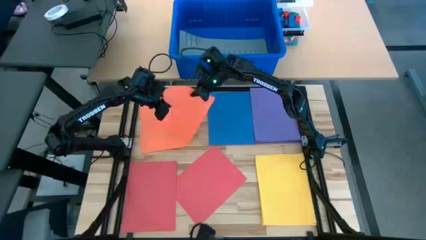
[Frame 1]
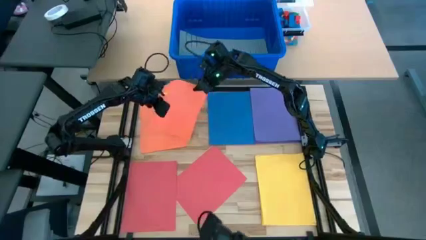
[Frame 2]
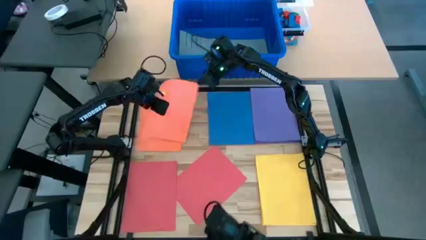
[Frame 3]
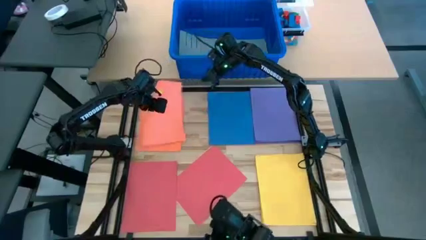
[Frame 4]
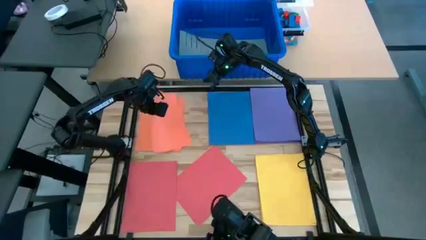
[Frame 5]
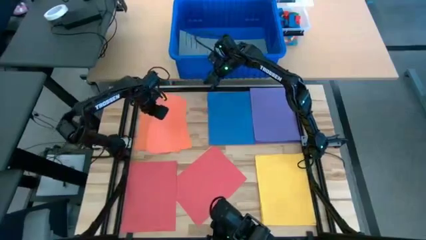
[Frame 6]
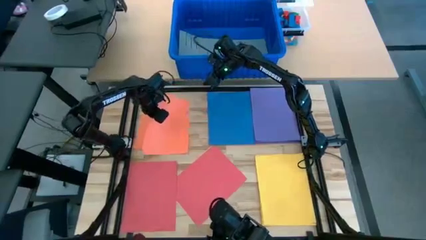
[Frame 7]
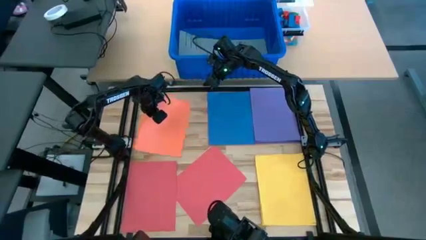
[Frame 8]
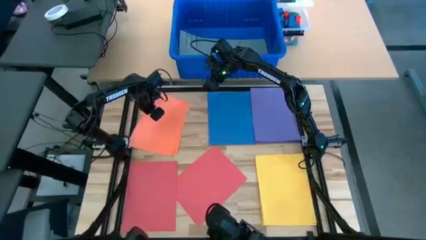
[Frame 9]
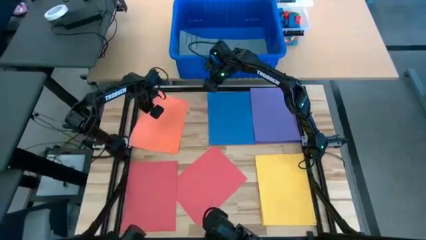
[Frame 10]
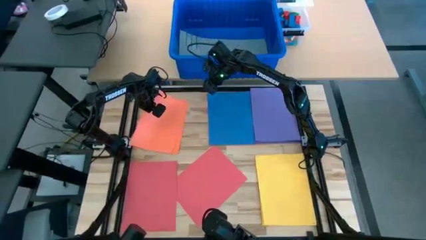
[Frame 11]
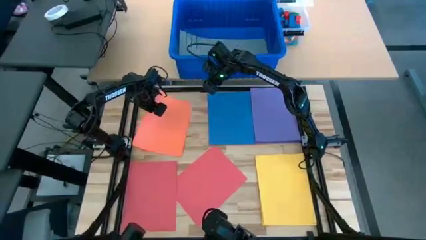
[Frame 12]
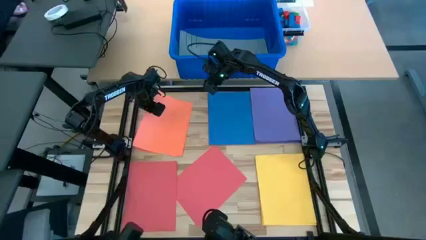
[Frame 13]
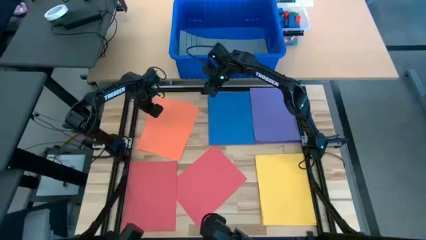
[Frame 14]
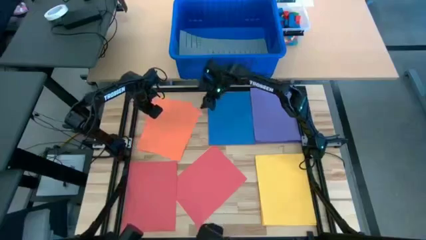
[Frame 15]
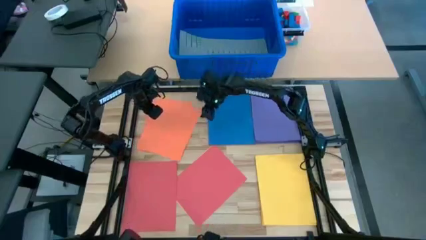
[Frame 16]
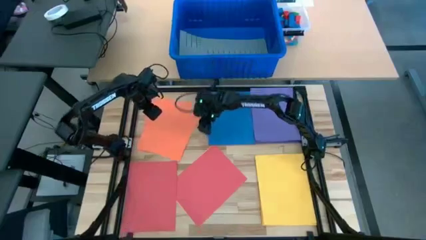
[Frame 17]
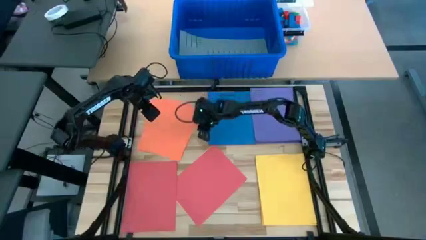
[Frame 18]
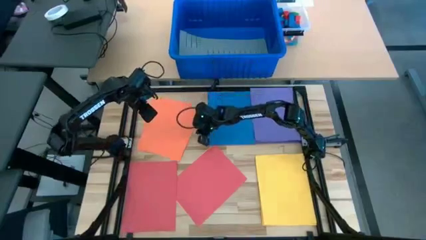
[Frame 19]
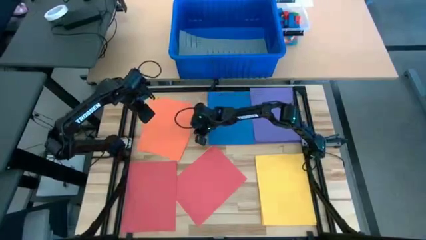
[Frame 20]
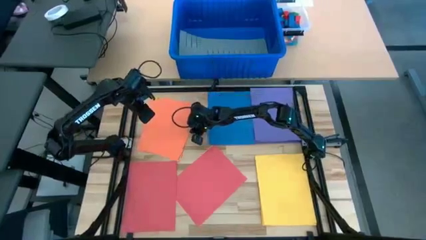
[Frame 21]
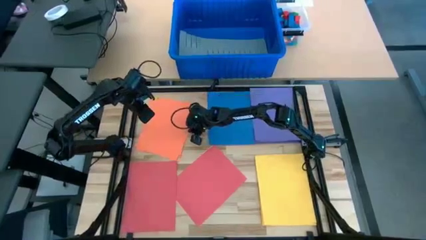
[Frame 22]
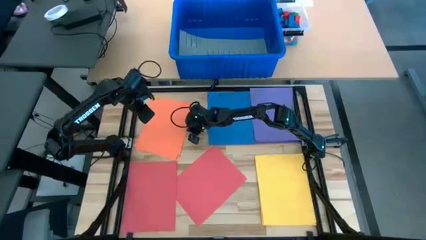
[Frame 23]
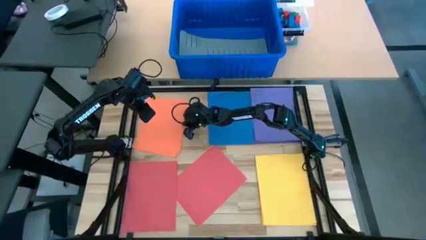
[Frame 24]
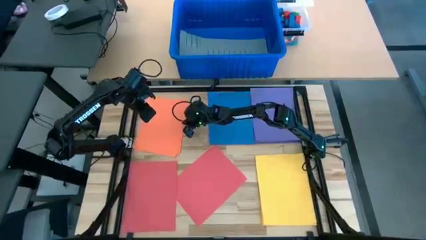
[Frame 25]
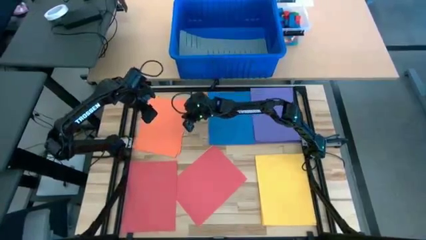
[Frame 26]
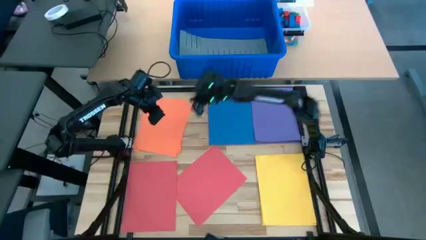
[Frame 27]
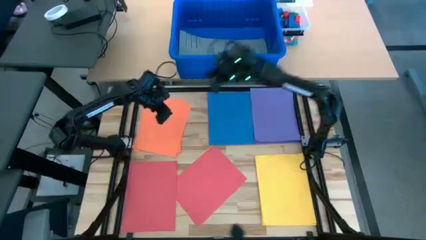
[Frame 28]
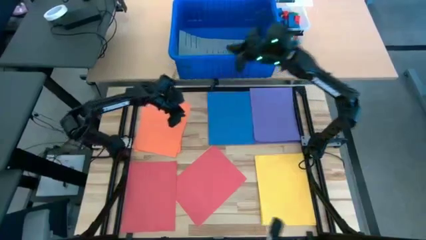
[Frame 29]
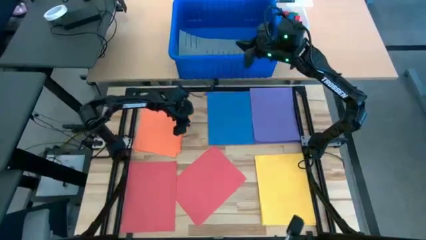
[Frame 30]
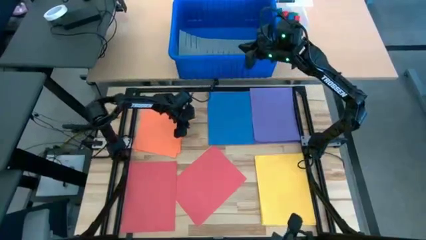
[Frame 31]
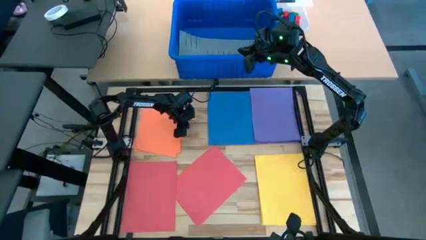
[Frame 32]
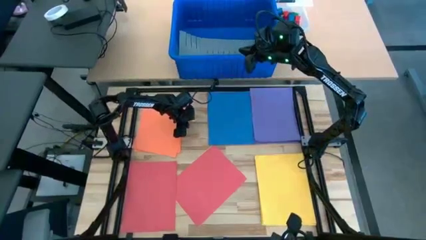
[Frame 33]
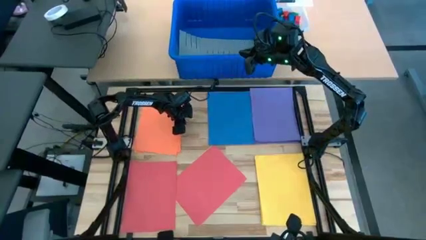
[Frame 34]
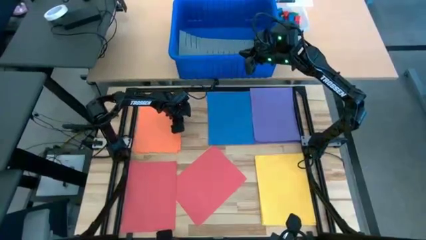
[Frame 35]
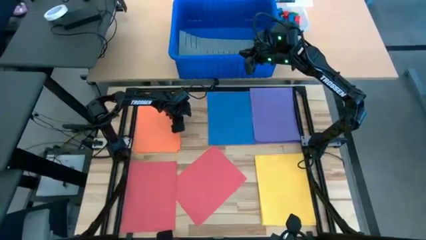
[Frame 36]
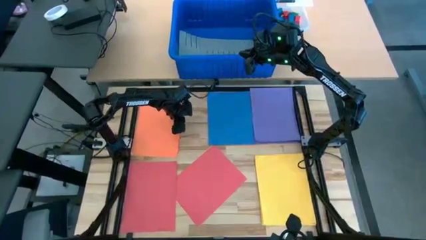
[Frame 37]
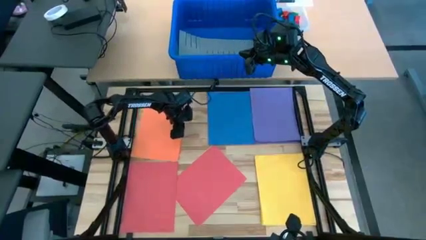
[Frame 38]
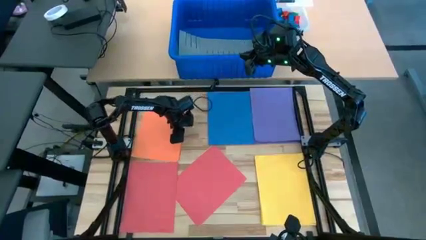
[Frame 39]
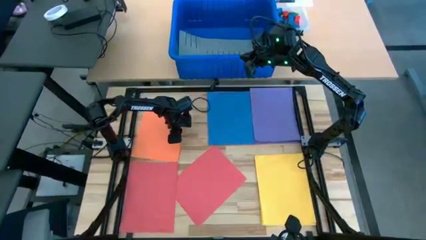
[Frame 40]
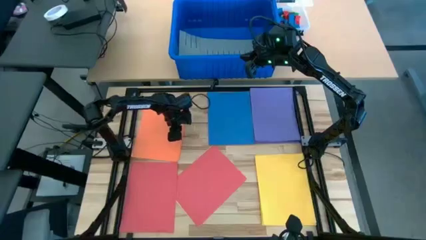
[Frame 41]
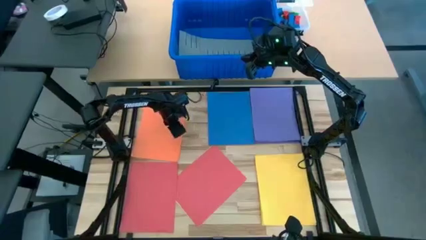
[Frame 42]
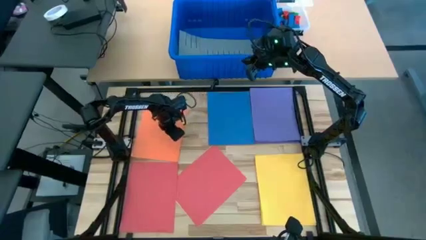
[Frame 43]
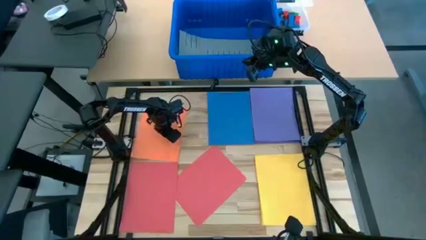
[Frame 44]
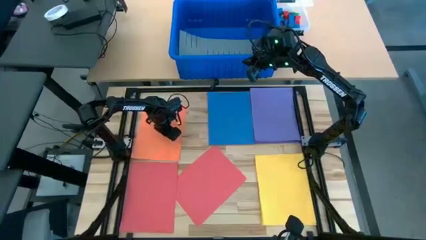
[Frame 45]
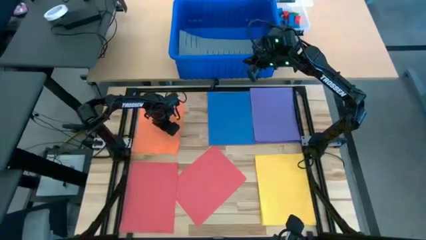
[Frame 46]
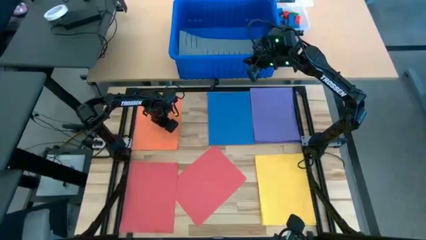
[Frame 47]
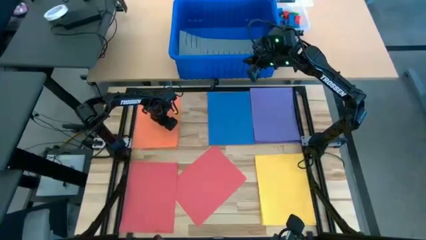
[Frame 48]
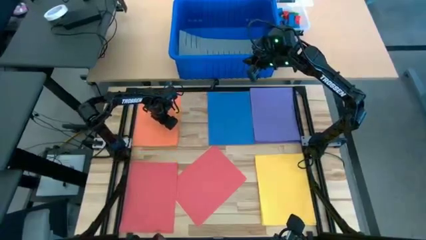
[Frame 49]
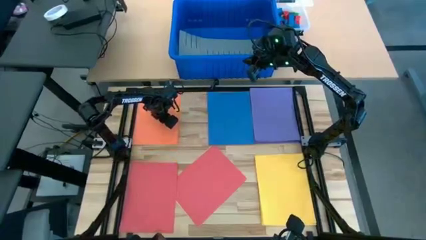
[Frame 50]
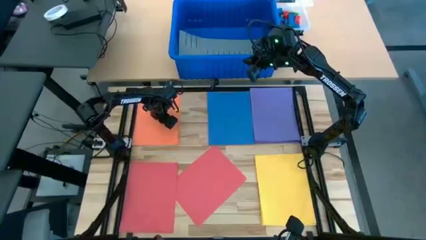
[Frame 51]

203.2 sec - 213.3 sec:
Task: Organize paper
Stack the orange paper on top of the other orange paper
